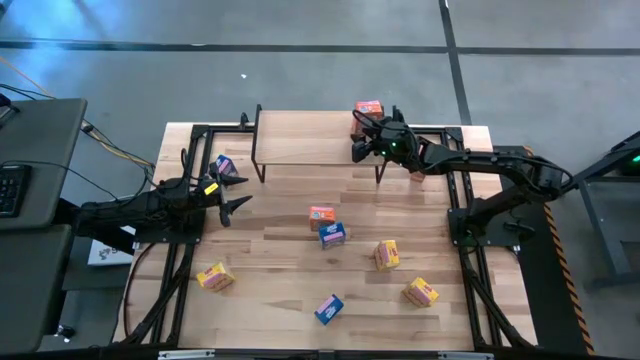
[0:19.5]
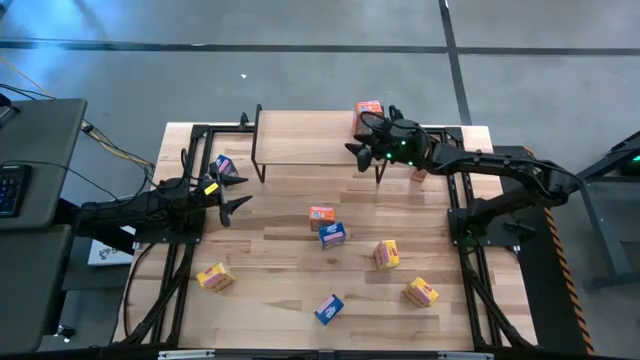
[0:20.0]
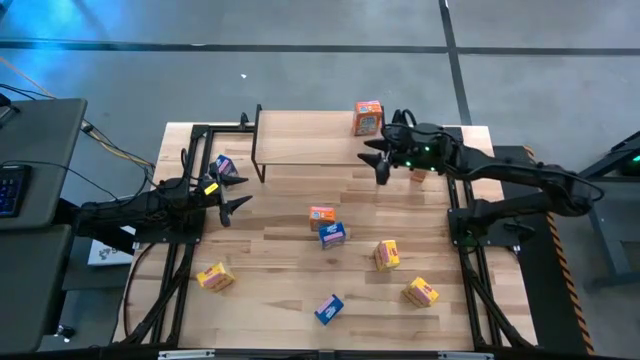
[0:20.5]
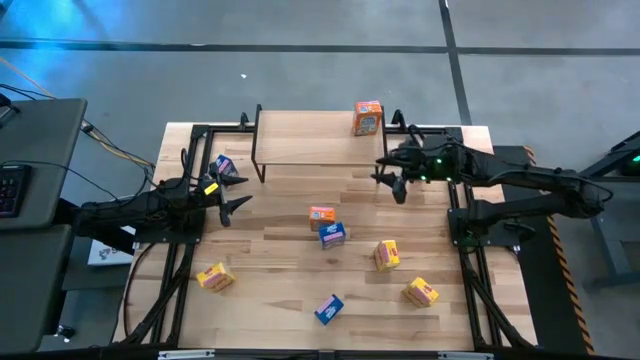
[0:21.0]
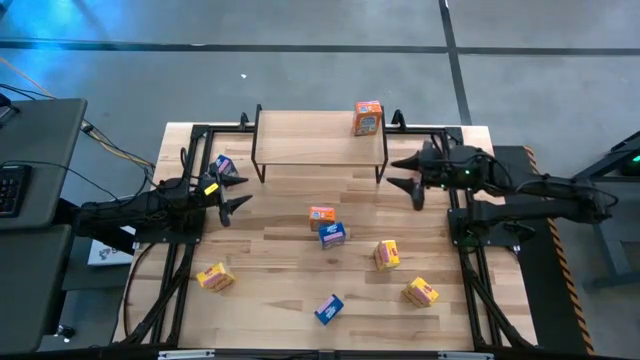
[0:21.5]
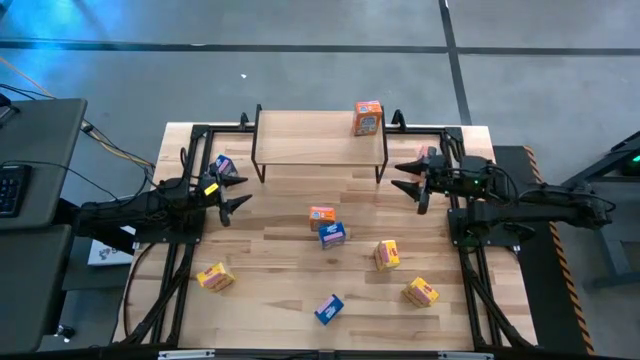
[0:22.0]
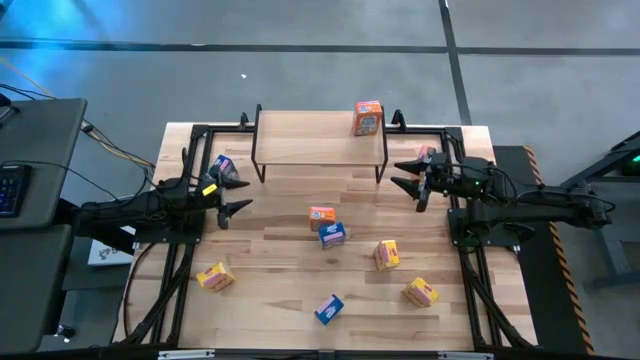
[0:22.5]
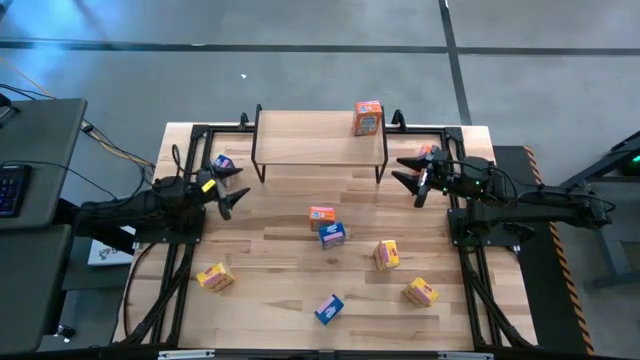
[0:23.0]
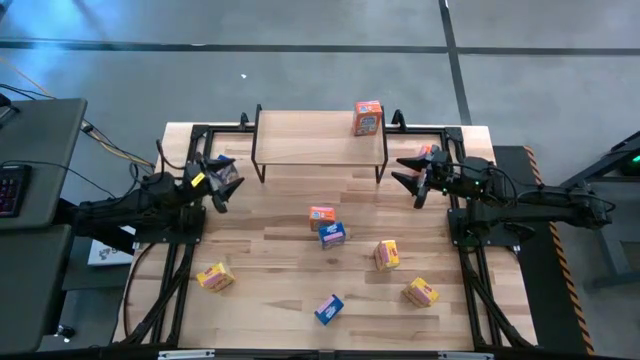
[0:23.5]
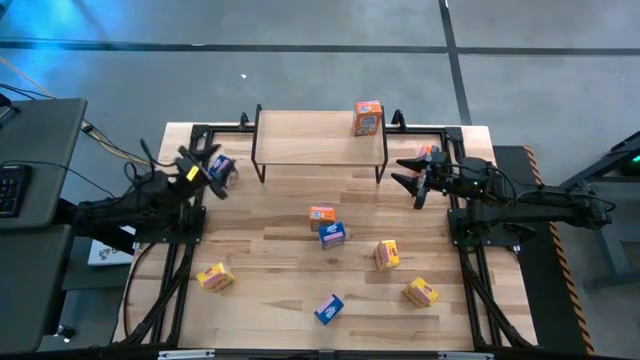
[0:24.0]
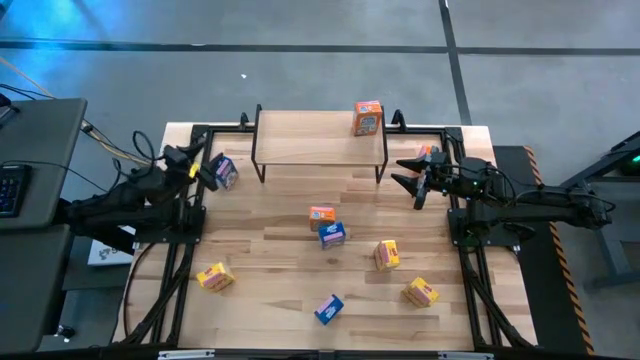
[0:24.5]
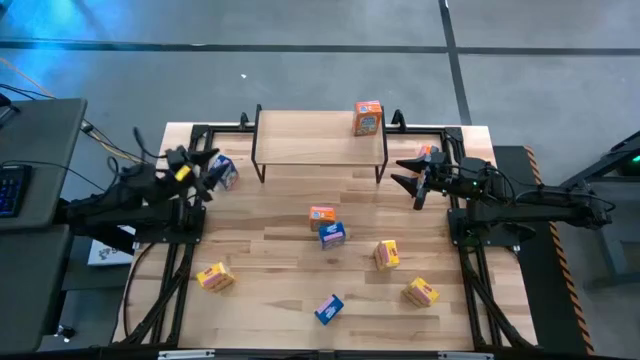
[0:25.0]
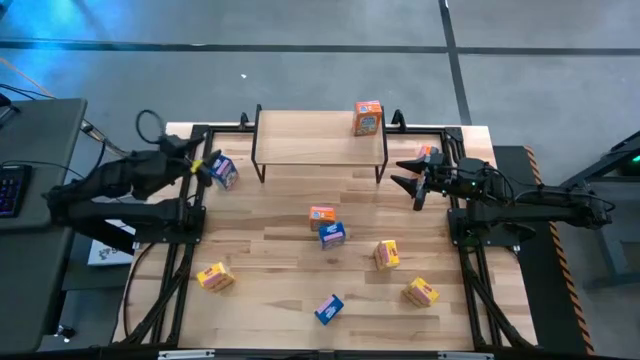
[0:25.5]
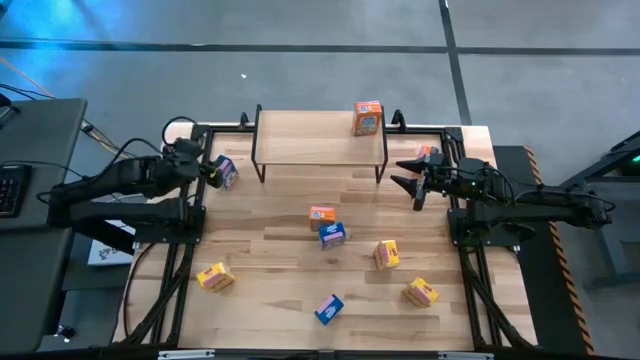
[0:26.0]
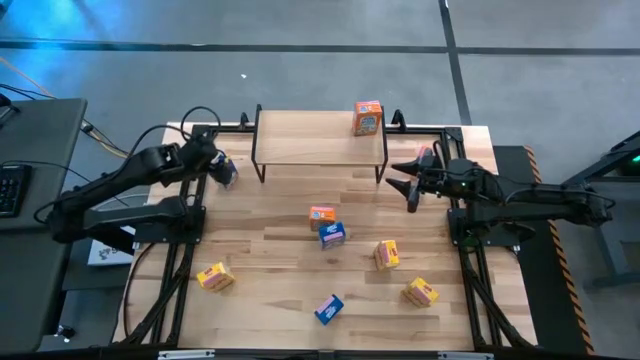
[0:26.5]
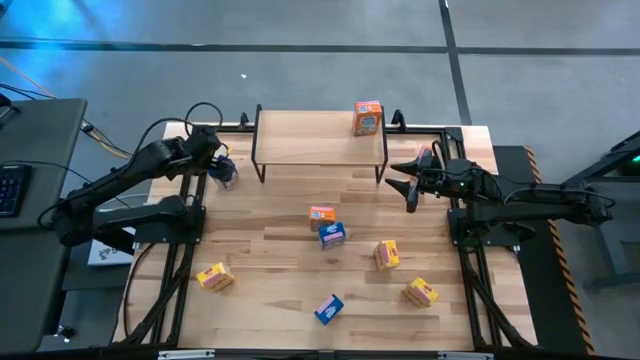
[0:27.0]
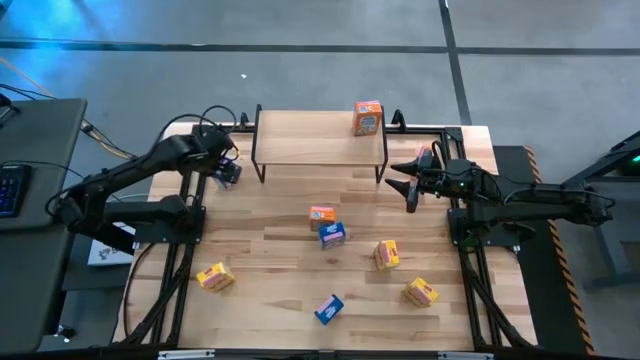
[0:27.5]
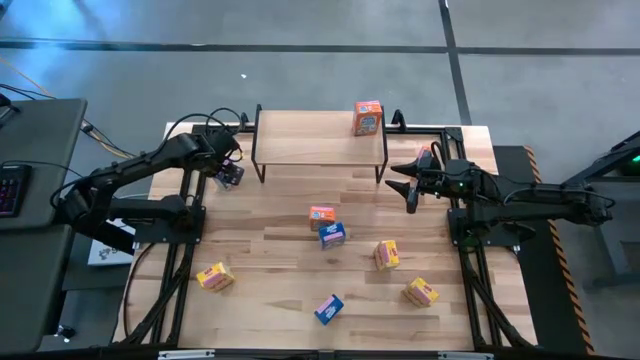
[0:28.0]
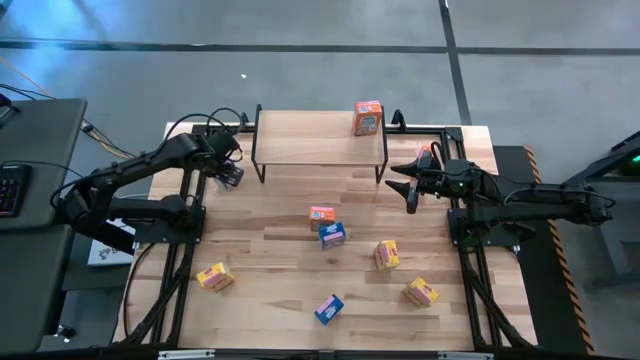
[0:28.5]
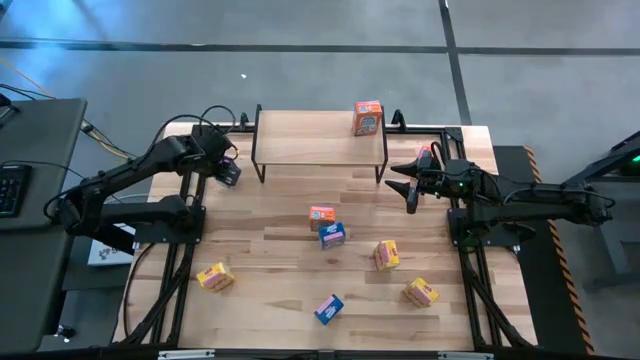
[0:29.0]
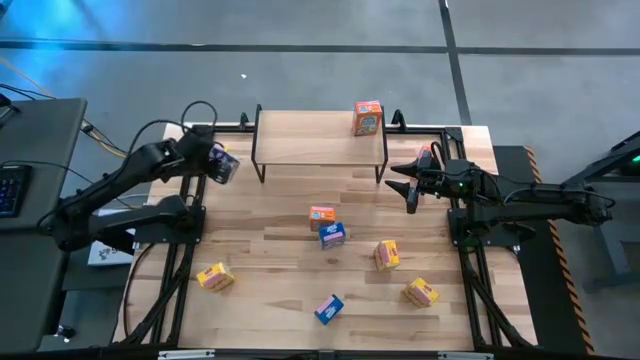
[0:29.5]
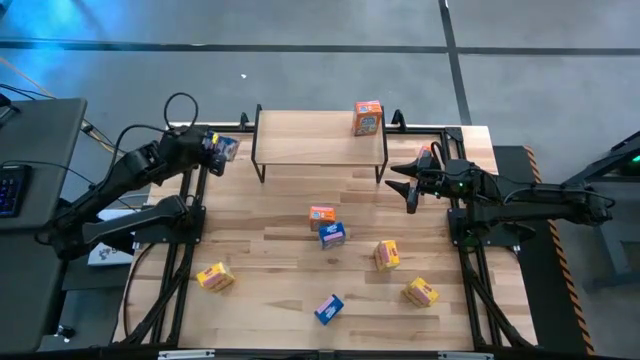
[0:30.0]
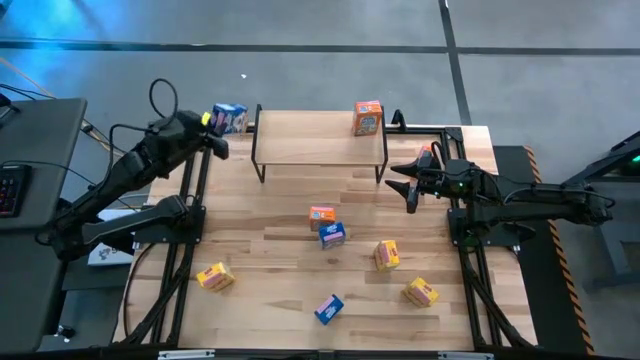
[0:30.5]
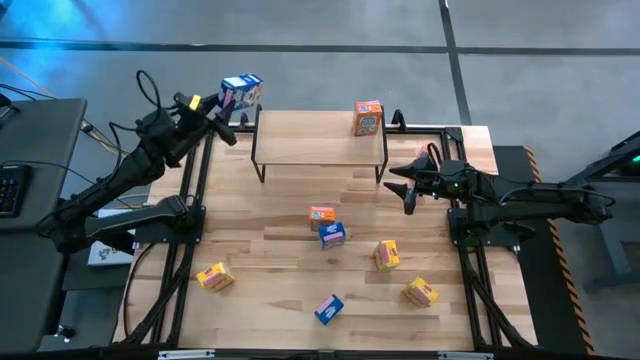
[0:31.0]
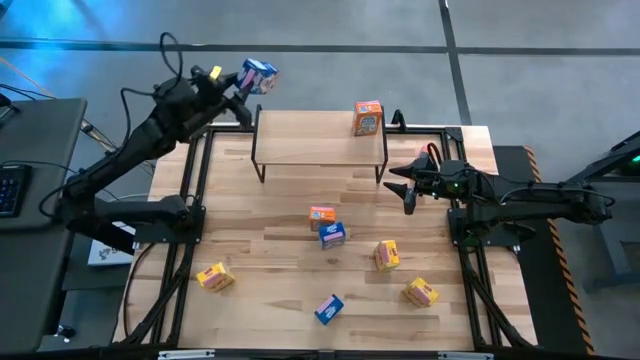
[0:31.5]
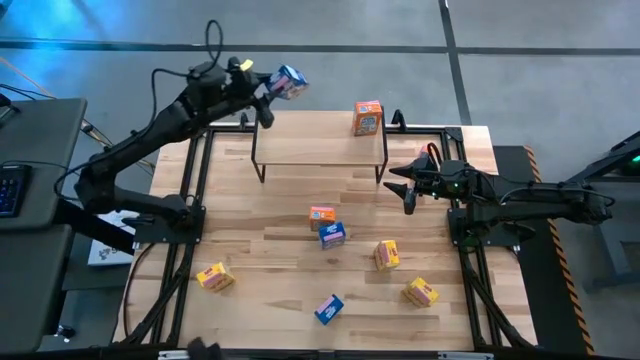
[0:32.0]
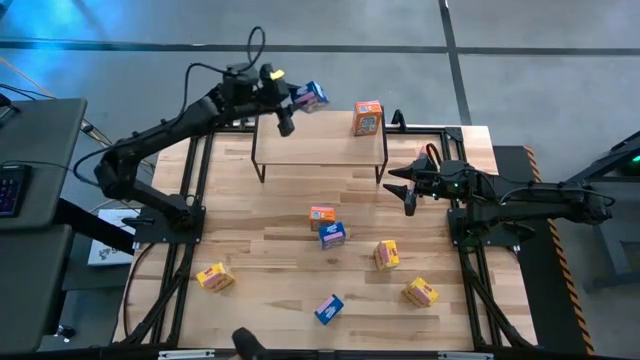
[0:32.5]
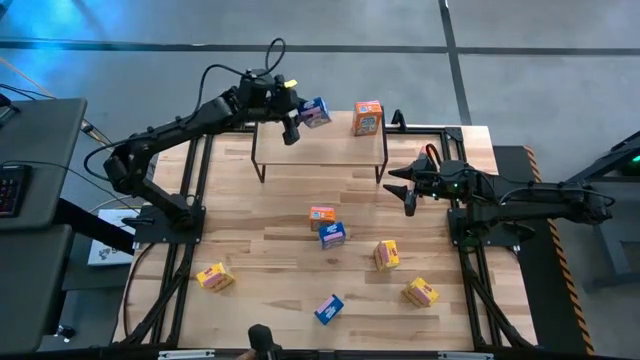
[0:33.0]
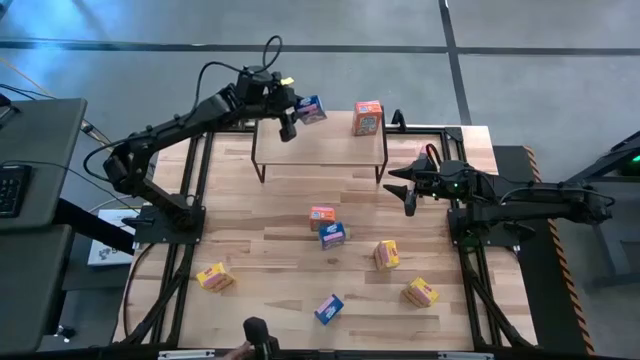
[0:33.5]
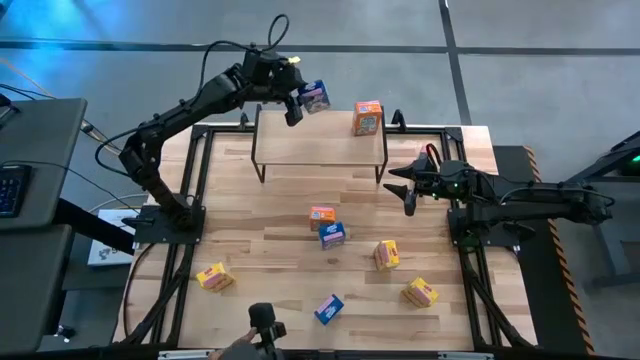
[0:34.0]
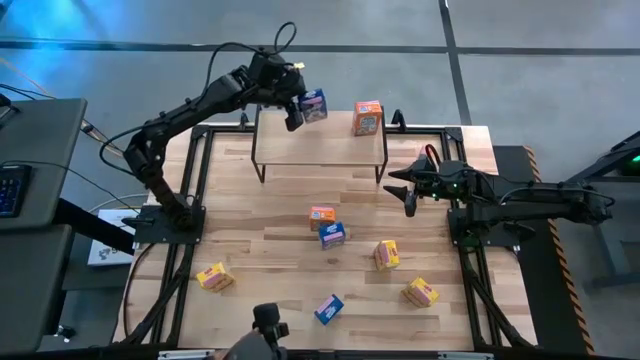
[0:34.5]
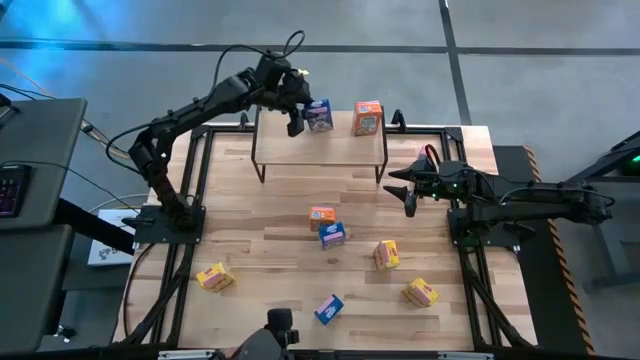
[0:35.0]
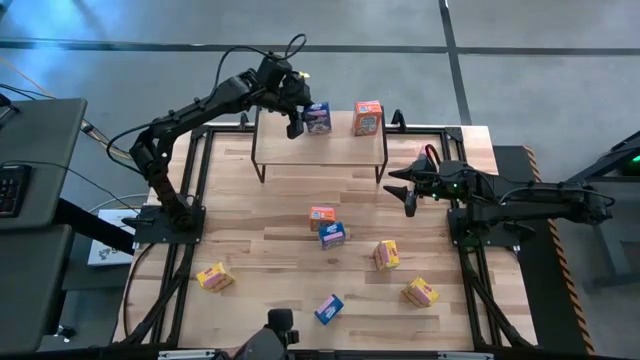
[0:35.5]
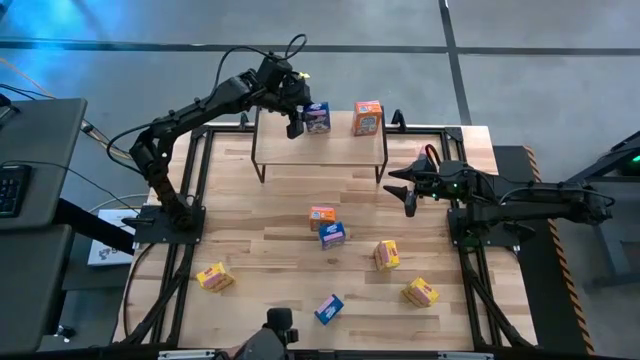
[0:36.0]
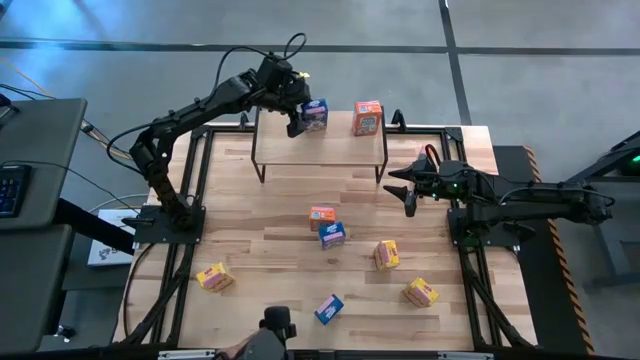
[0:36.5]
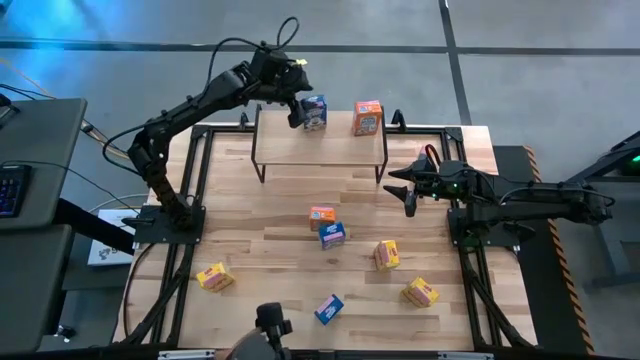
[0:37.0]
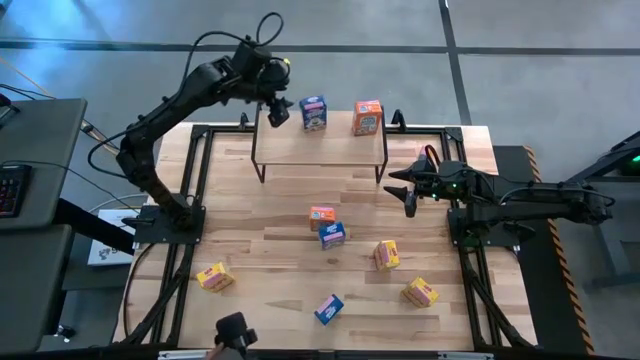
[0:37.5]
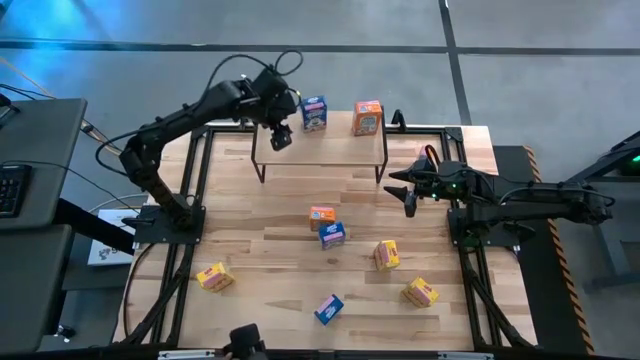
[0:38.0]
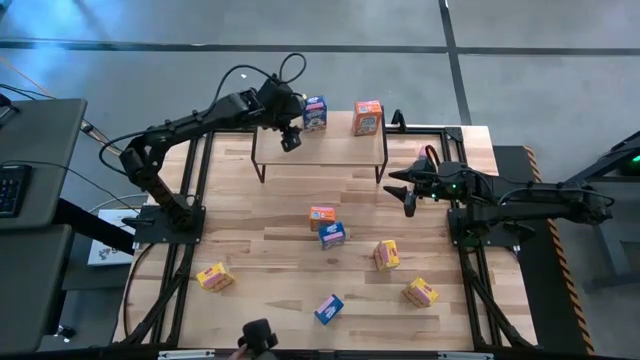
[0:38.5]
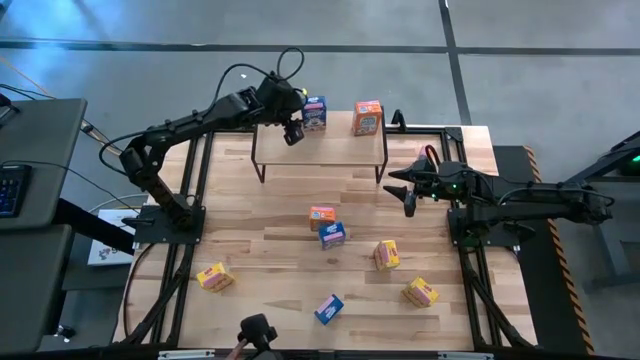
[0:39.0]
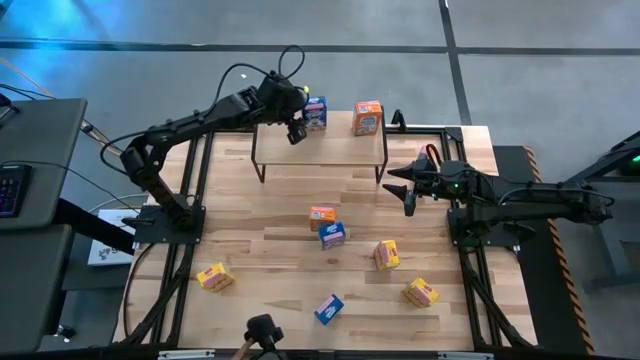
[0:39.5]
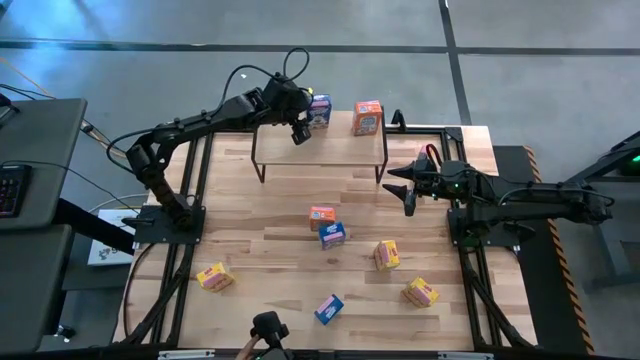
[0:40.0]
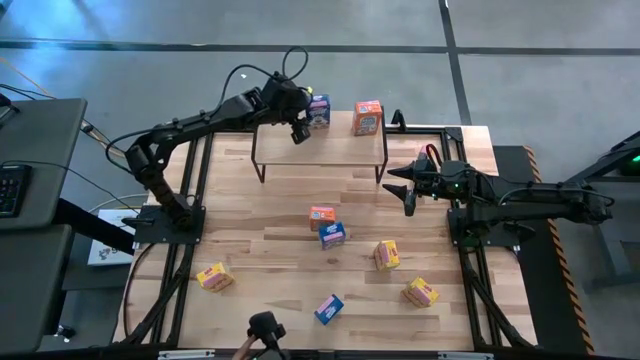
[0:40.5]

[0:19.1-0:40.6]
Task: Stack cereal on shelf
Put the top blue cereal box on the shelf
